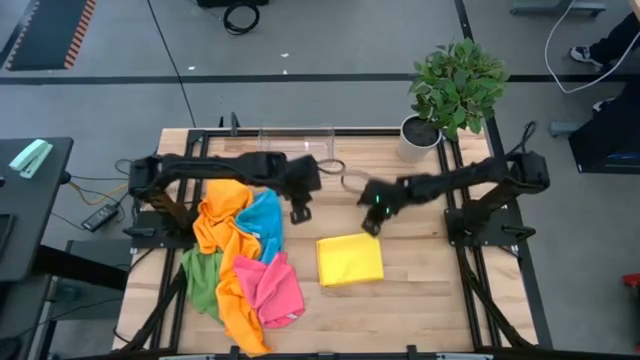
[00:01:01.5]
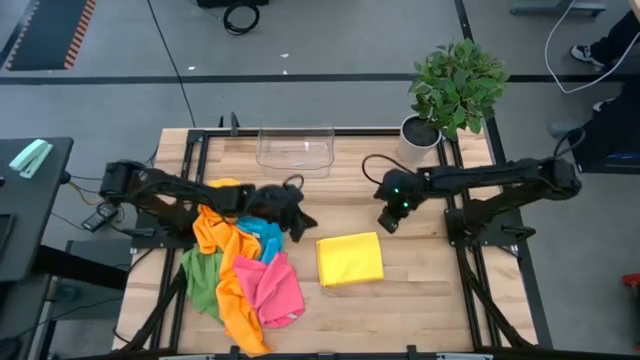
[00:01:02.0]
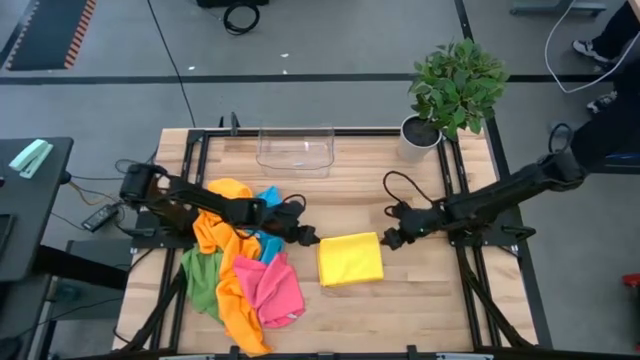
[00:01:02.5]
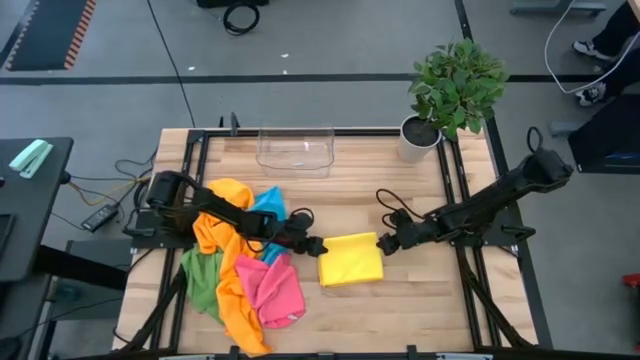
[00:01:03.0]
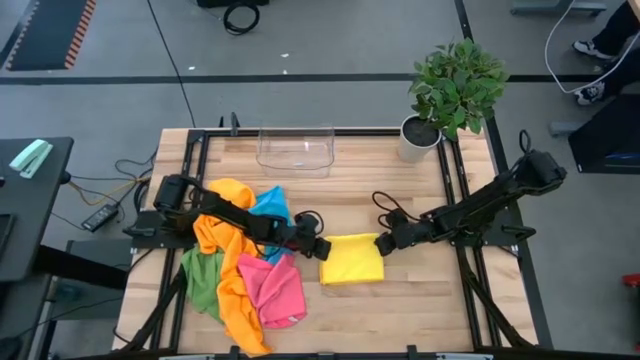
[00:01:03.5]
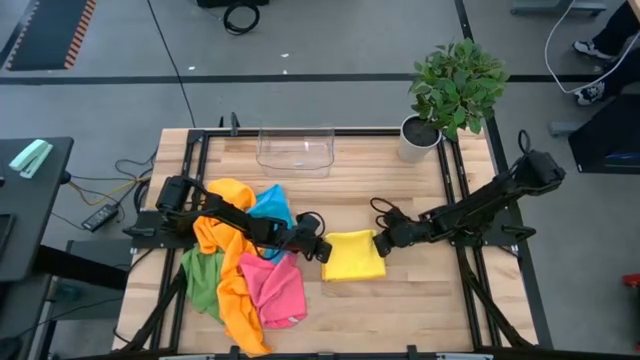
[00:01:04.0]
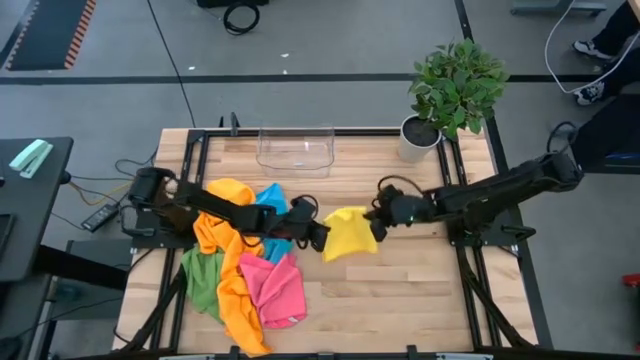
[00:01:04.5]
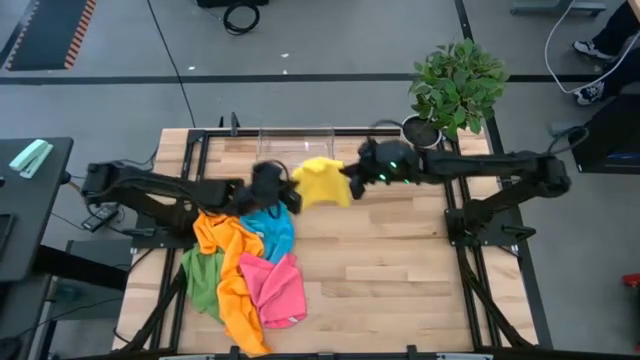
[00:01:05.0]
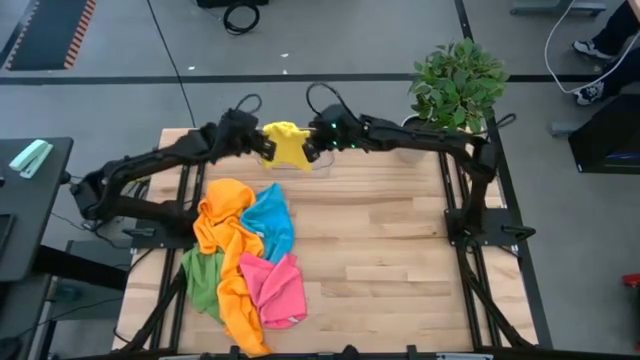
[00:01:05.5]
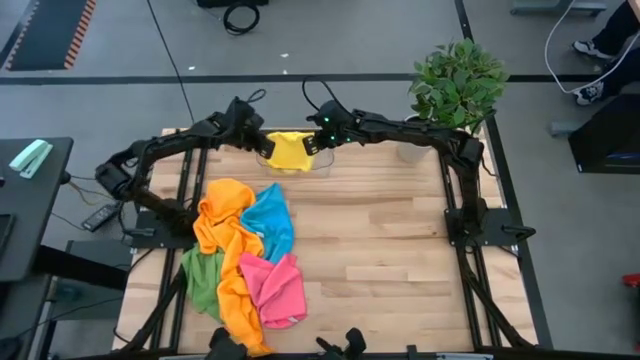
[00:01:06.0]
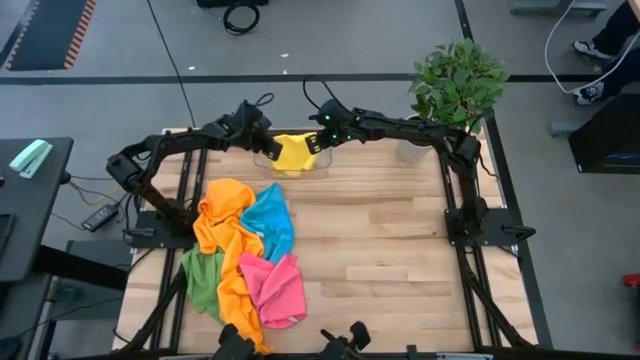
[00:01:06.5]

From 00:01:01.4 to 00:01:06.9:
Task: Fold microfiber towels
Put the yellow microfiber towel into the transparent bin

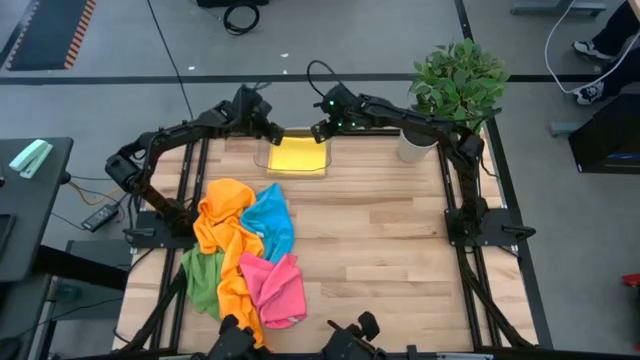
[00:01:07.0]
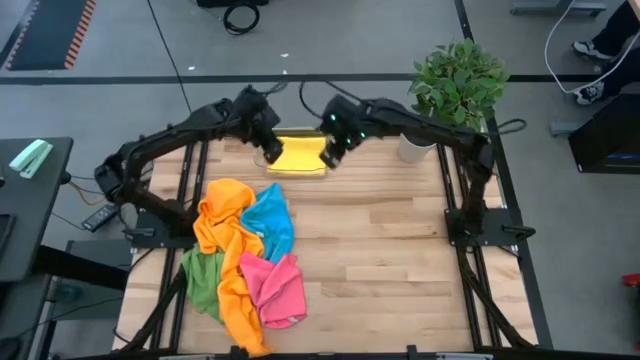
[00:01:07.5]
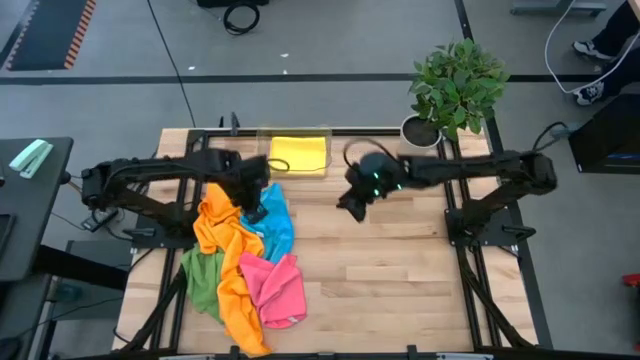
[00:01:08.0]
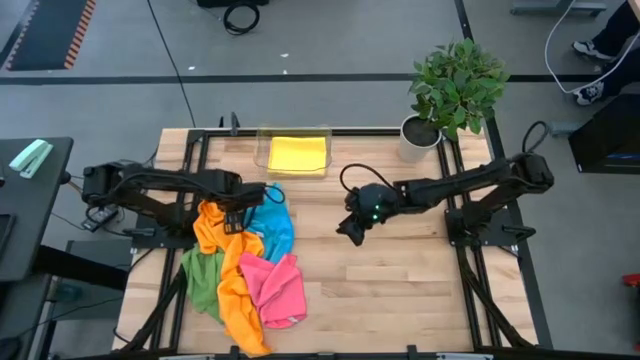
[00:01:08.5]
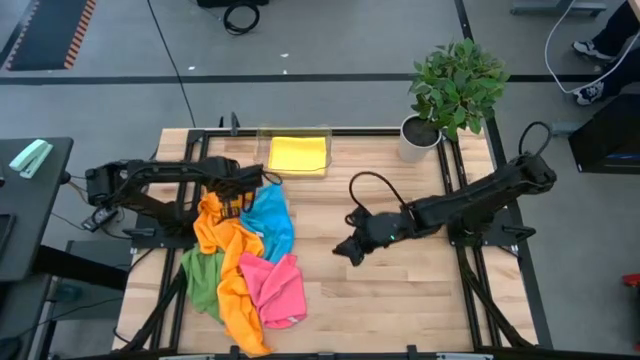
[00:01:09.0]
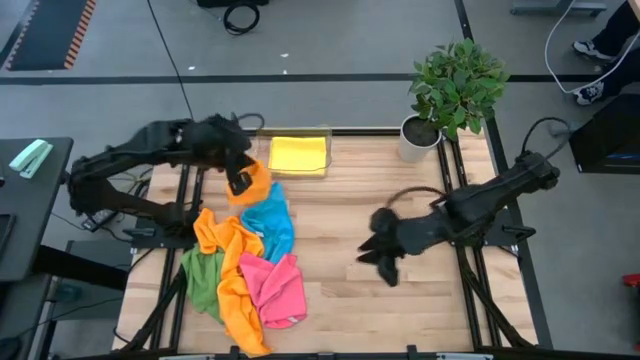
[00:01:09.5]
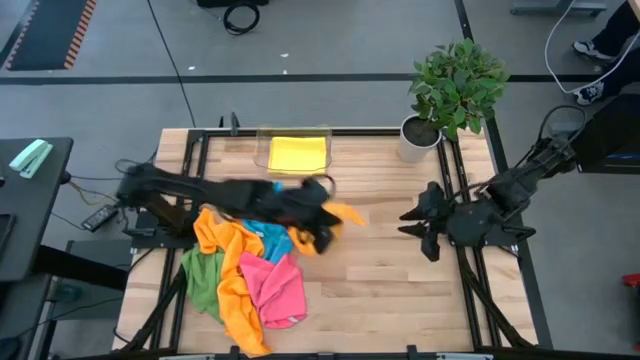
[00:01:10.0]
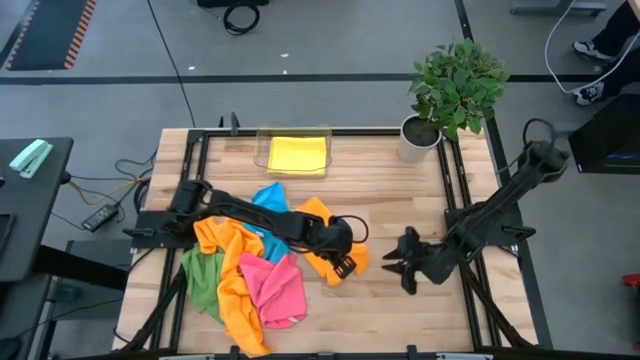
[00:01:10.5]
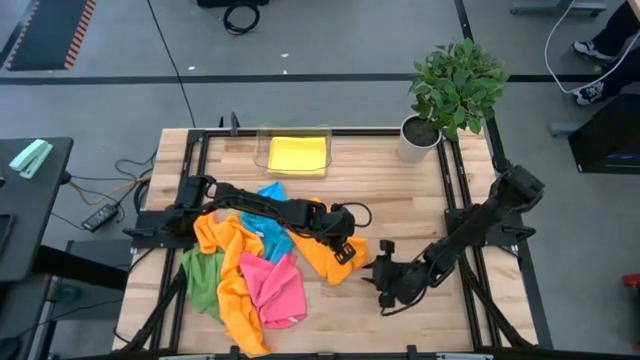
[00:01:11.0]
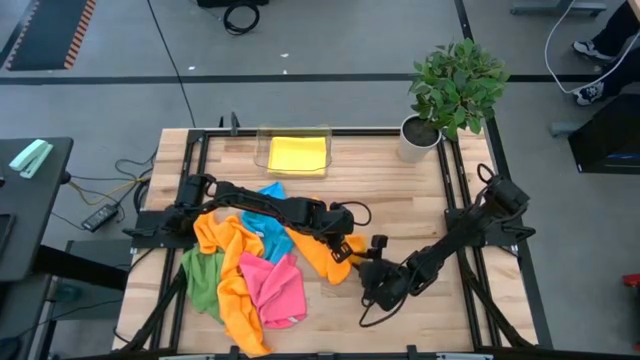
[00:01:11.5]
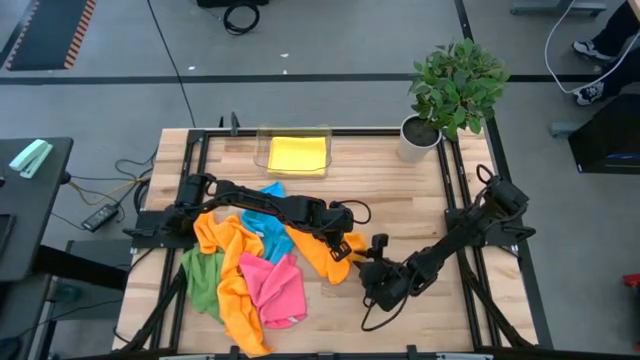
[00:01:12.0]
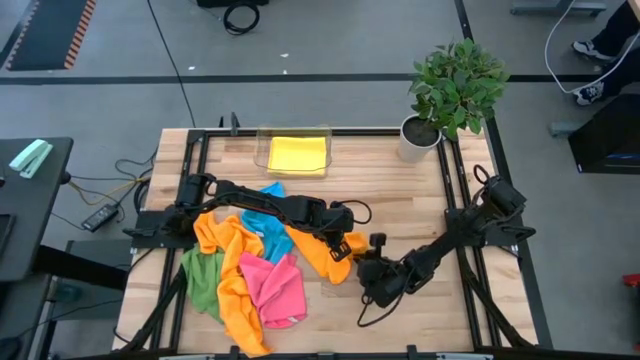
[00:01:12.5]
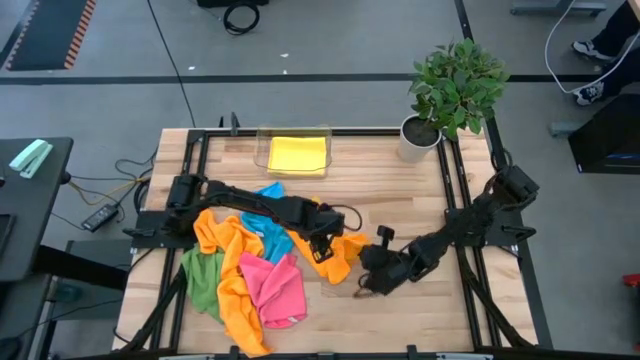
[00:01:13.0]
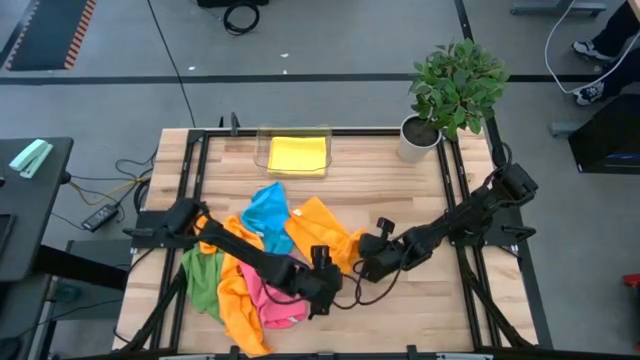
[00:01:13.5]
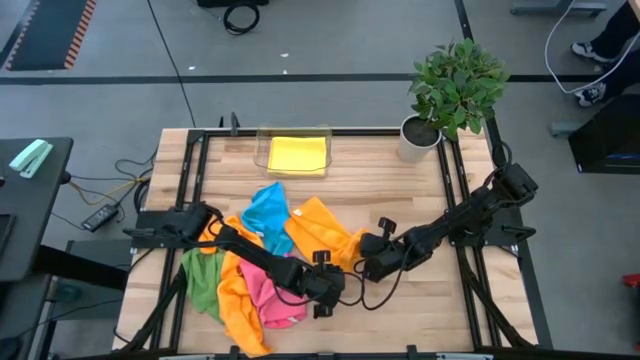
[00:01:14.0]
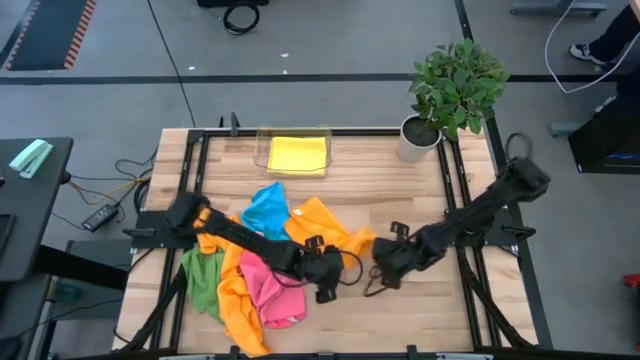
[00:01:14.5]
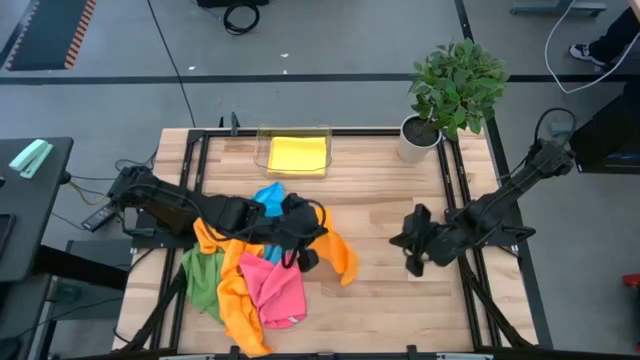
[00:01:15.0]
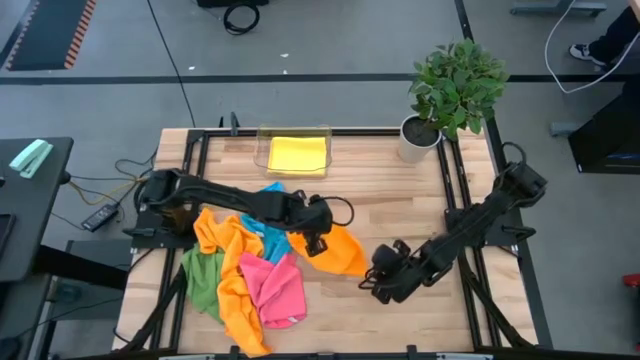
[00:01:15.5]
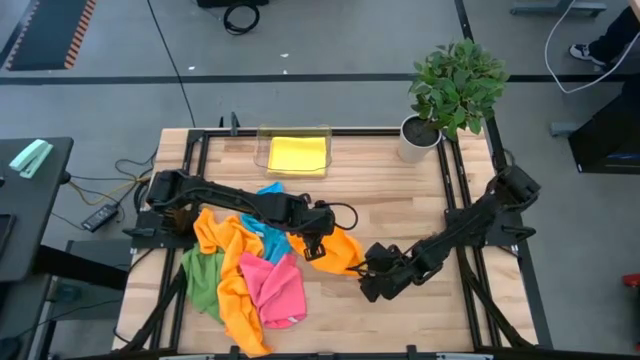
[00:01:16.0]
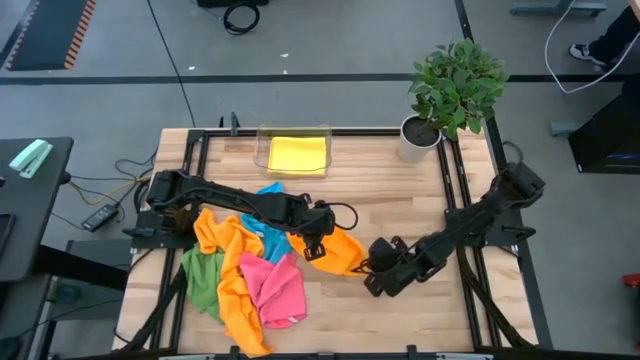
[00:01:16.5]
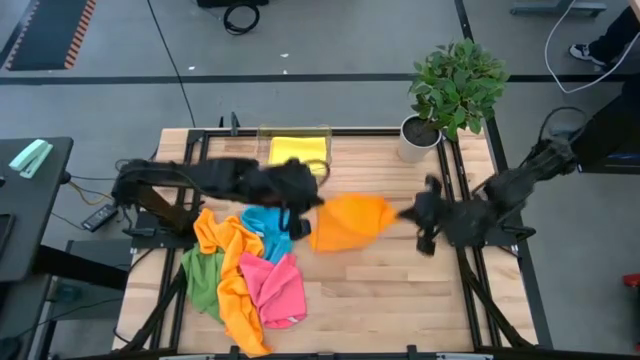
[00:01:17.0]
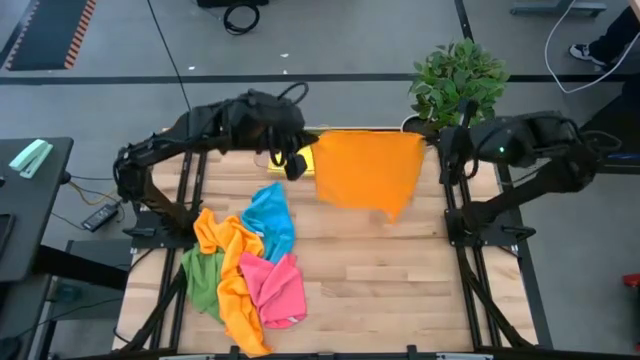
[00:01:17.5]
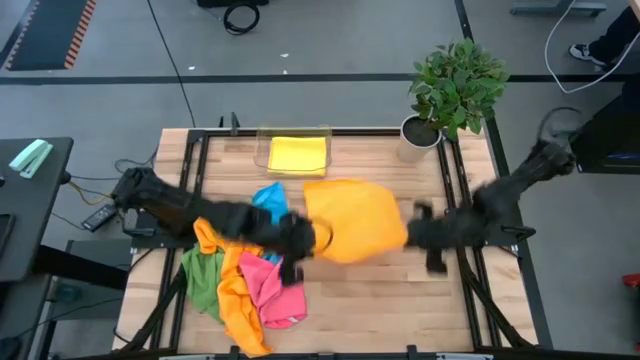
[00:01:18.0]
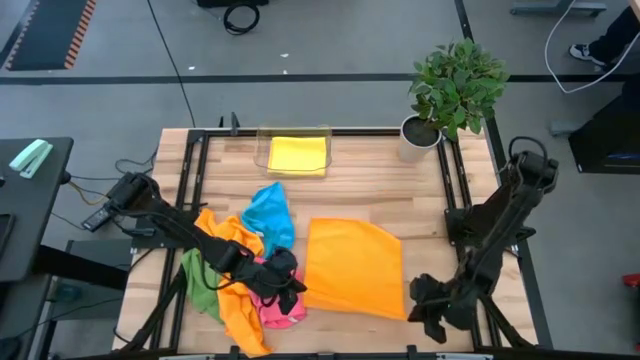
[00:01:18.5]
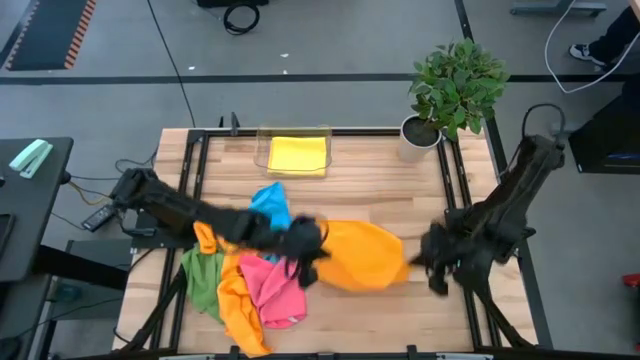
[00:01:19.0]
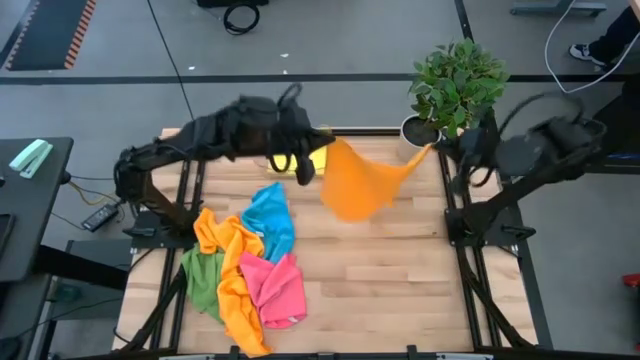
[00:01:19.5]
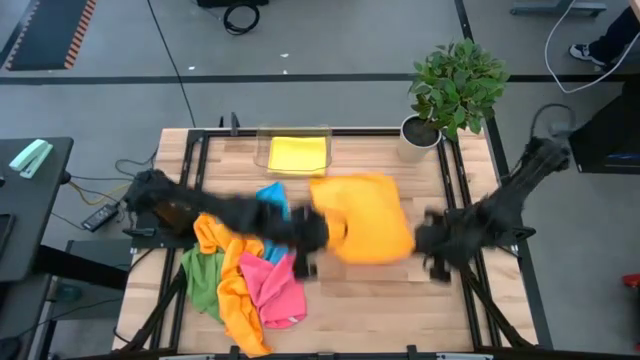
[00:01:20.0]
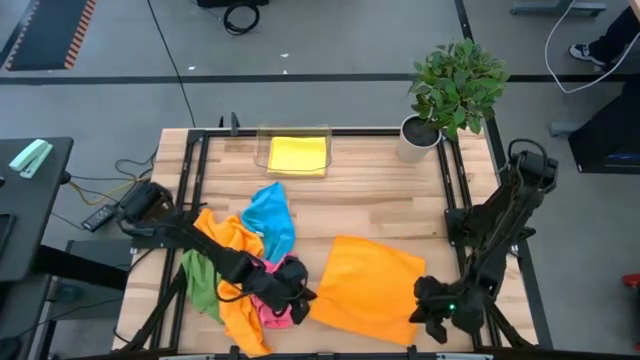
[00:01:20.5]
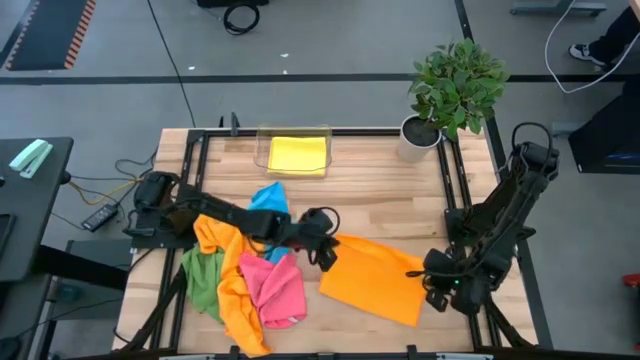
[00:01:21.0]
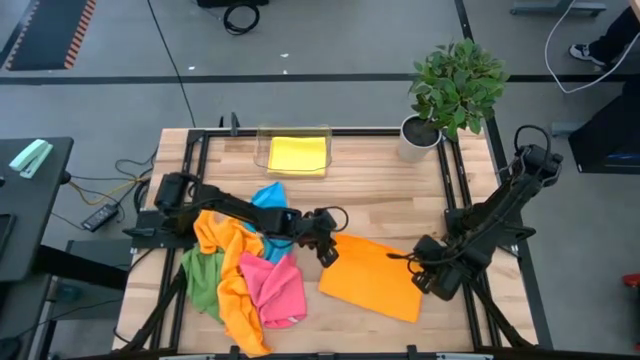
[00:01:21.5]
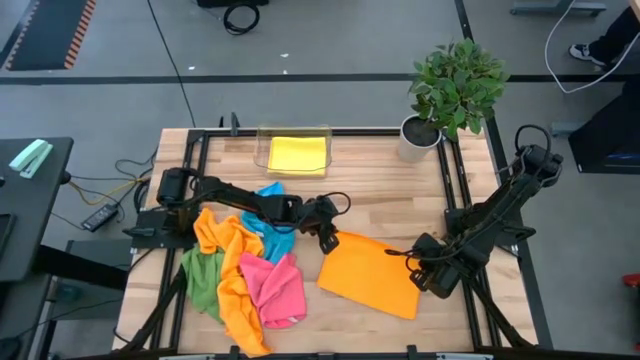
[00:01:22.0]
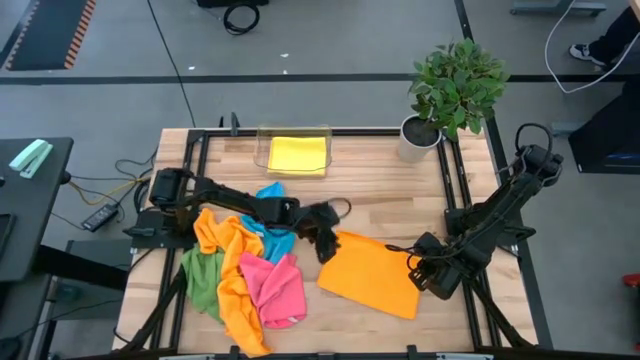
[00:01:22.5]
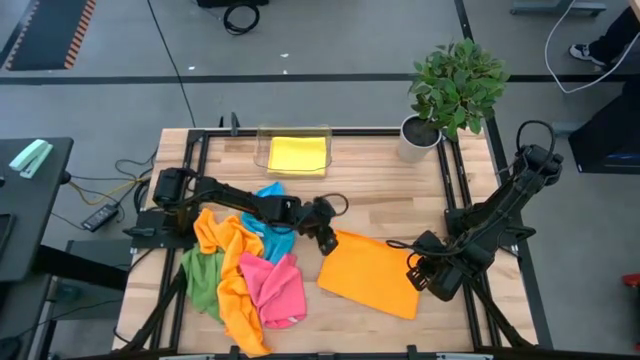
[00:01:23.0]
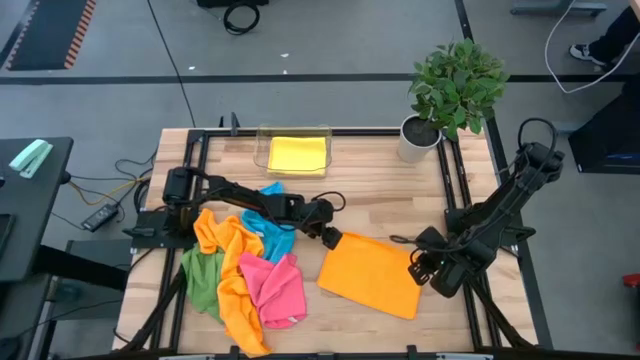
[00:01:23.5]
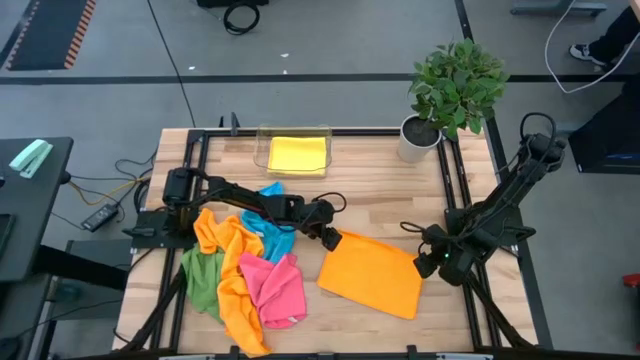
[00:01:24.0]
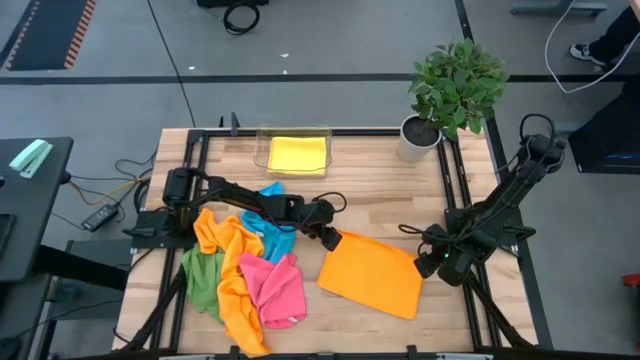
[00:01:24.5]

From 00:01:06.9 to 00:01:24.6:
Fold the orange microfiber towel
